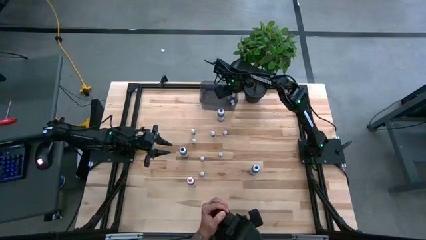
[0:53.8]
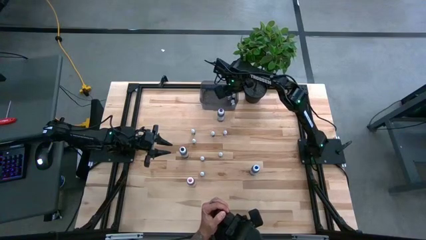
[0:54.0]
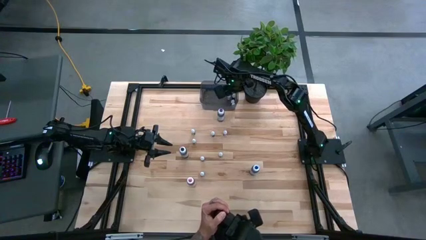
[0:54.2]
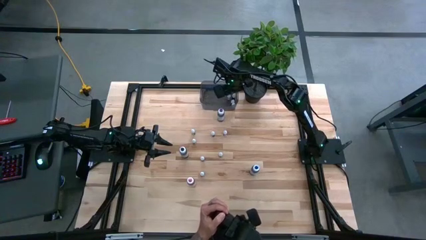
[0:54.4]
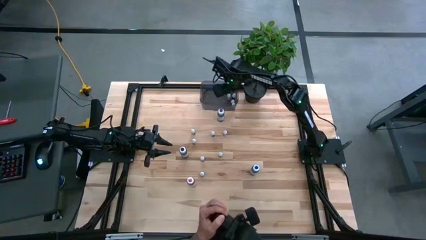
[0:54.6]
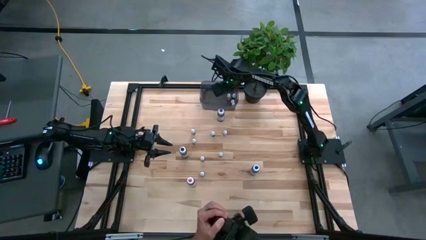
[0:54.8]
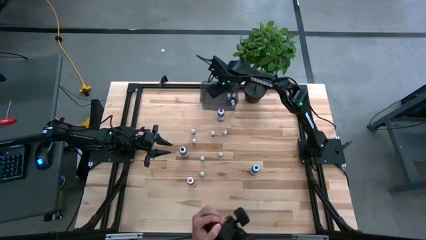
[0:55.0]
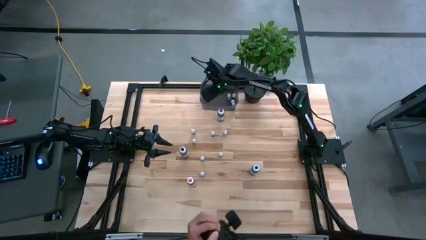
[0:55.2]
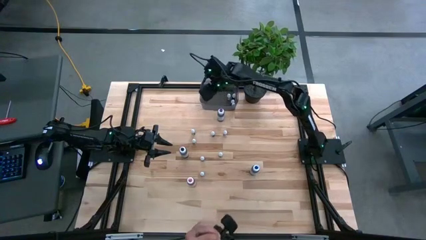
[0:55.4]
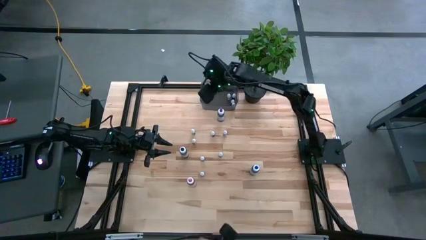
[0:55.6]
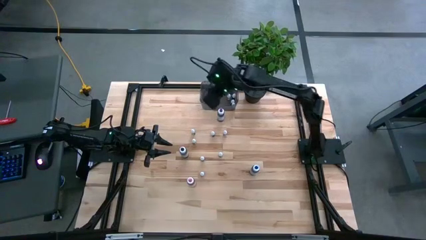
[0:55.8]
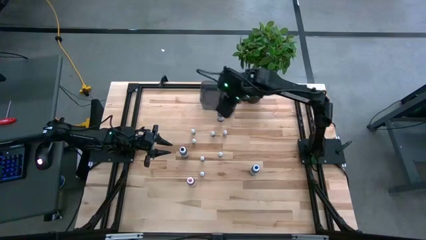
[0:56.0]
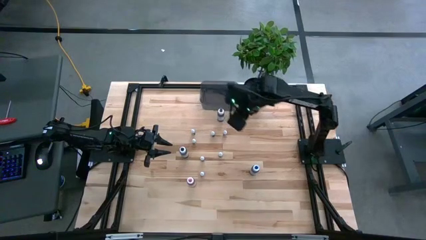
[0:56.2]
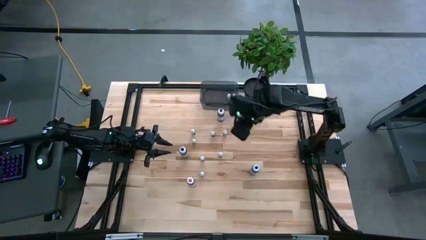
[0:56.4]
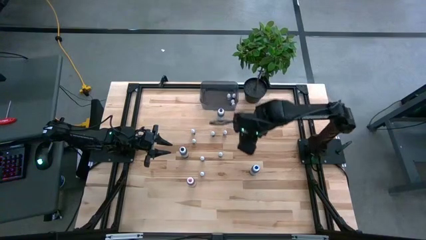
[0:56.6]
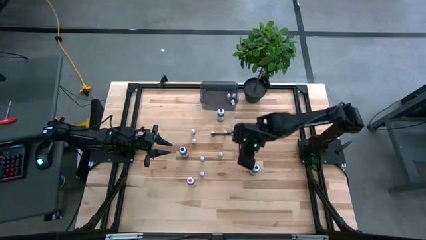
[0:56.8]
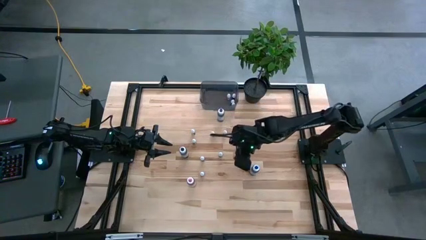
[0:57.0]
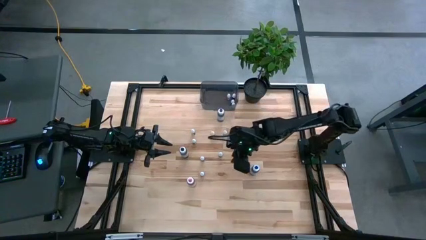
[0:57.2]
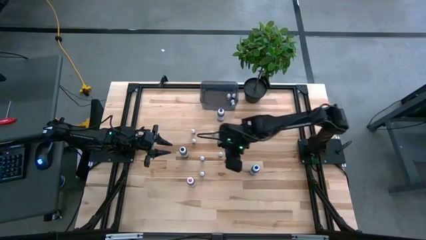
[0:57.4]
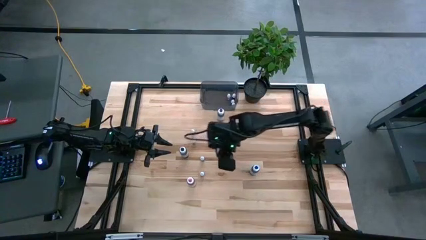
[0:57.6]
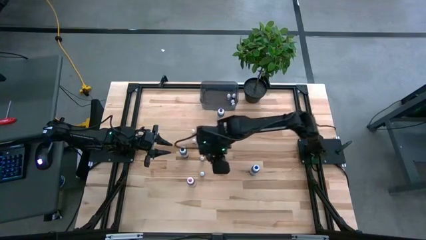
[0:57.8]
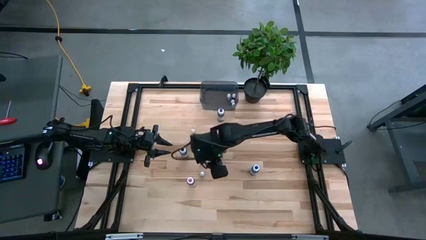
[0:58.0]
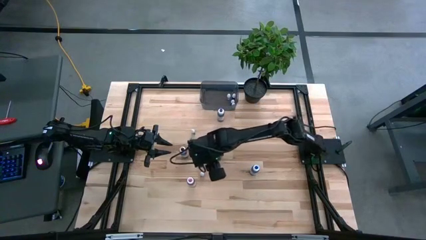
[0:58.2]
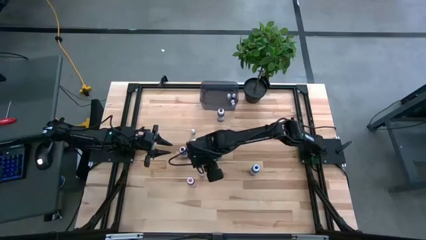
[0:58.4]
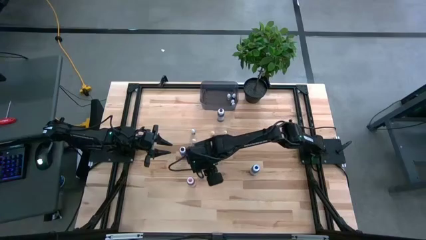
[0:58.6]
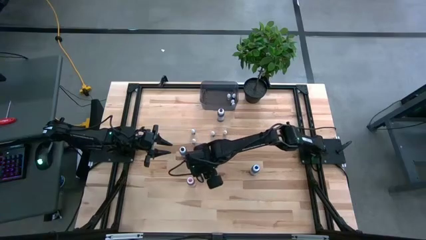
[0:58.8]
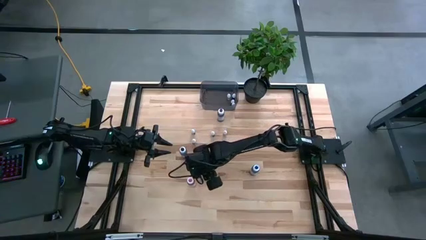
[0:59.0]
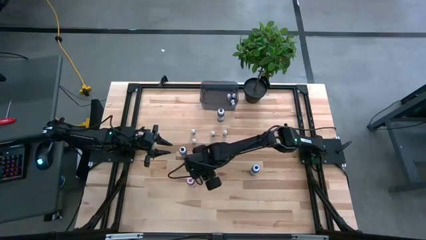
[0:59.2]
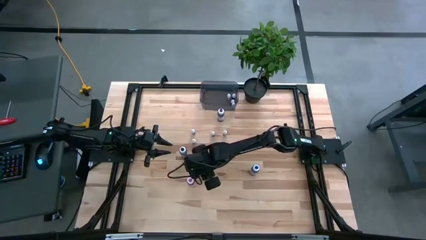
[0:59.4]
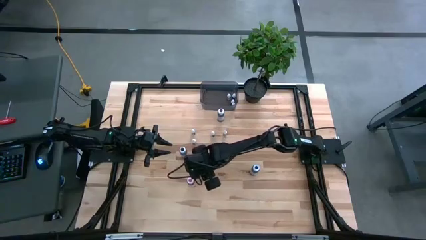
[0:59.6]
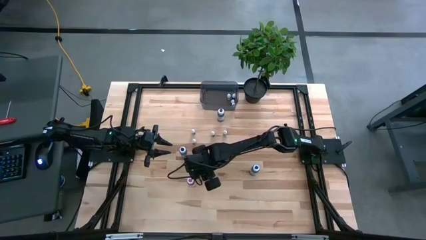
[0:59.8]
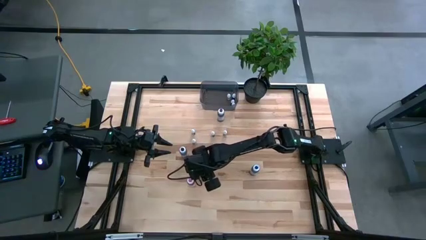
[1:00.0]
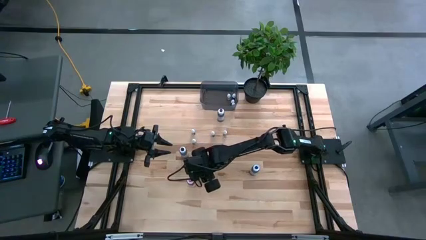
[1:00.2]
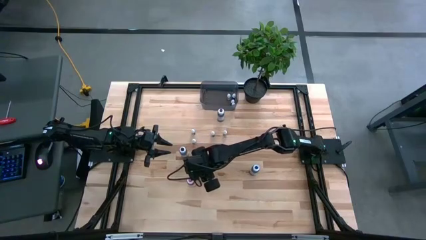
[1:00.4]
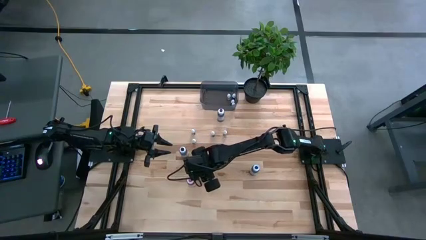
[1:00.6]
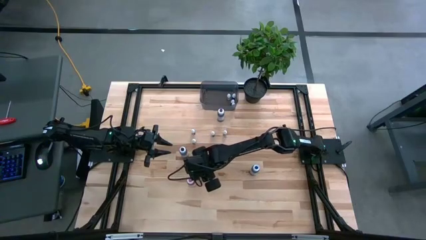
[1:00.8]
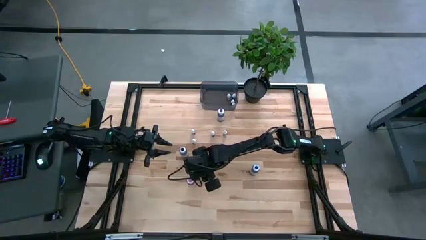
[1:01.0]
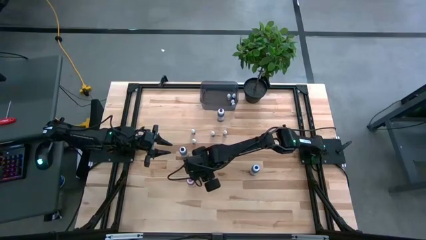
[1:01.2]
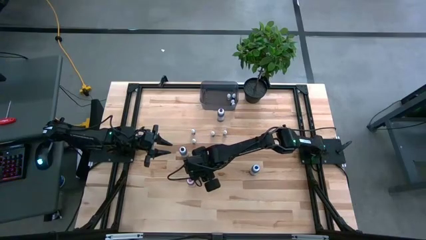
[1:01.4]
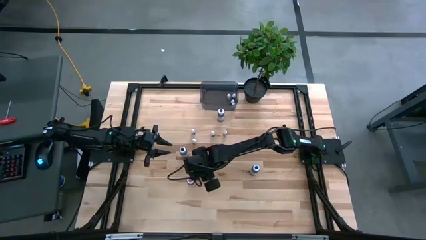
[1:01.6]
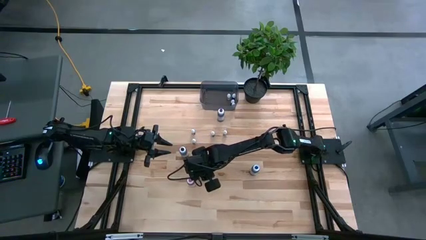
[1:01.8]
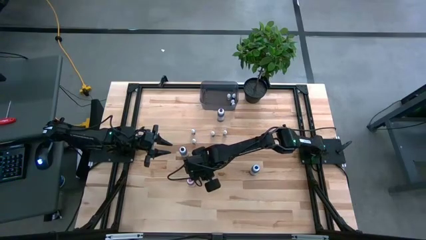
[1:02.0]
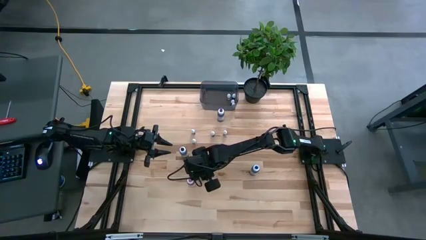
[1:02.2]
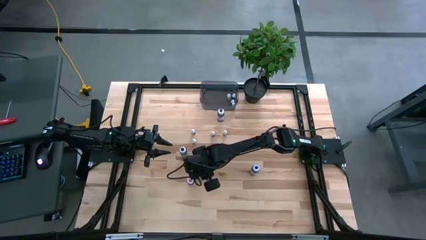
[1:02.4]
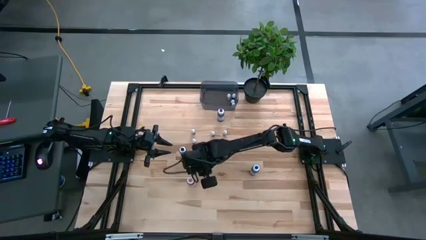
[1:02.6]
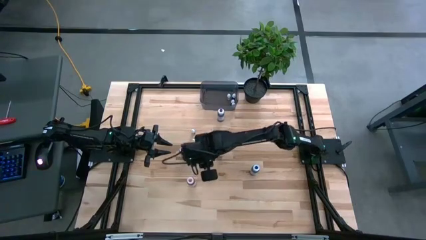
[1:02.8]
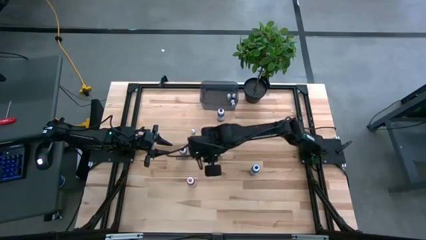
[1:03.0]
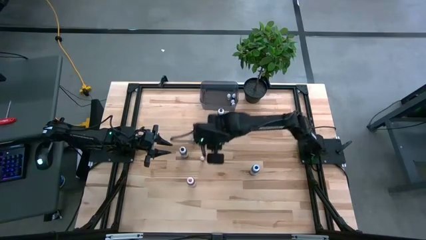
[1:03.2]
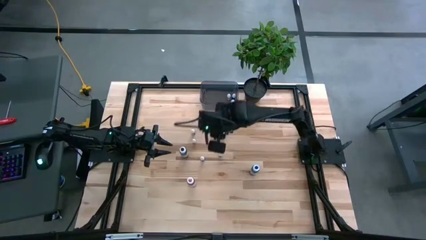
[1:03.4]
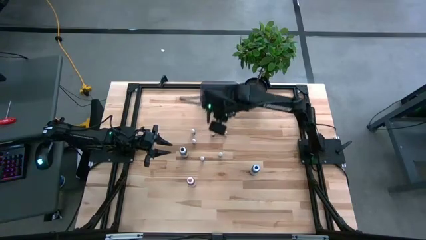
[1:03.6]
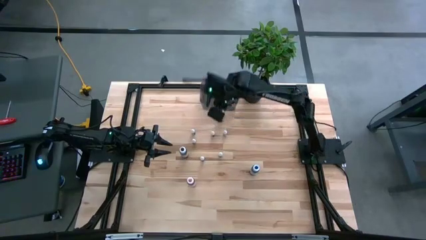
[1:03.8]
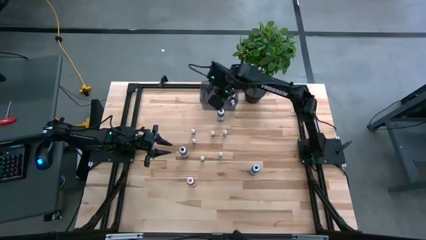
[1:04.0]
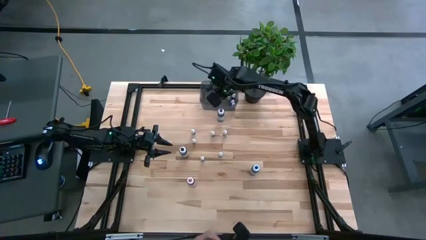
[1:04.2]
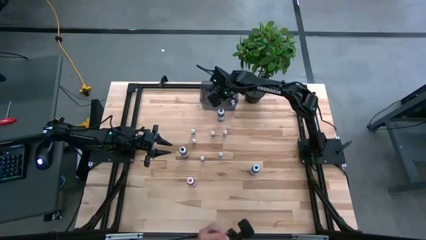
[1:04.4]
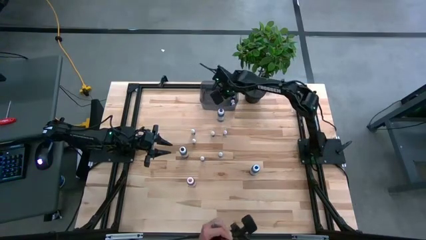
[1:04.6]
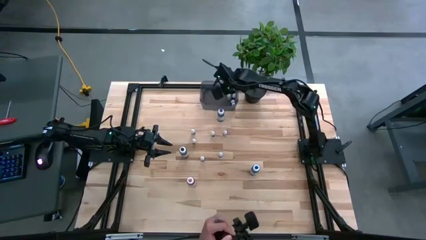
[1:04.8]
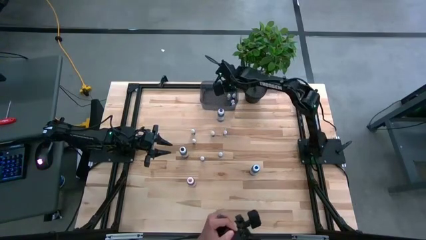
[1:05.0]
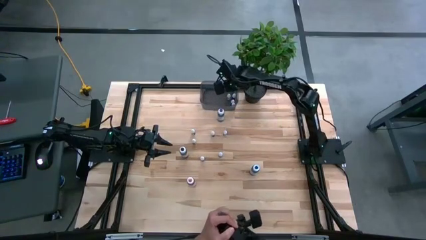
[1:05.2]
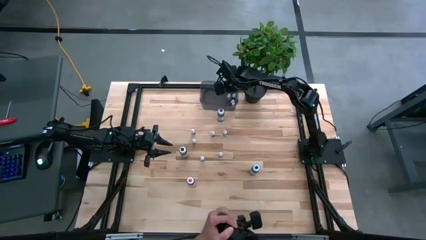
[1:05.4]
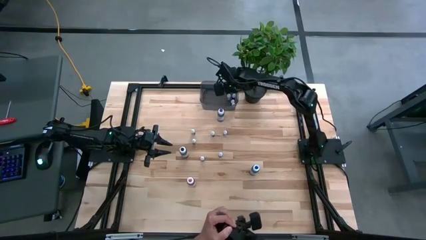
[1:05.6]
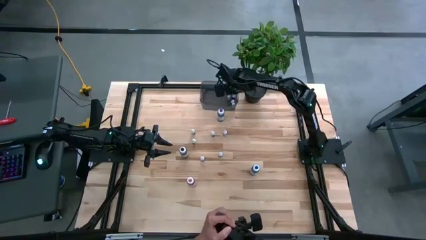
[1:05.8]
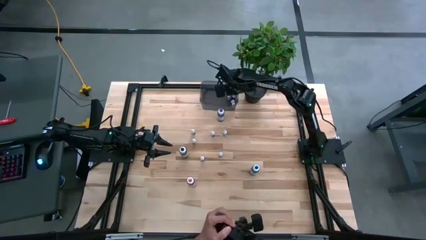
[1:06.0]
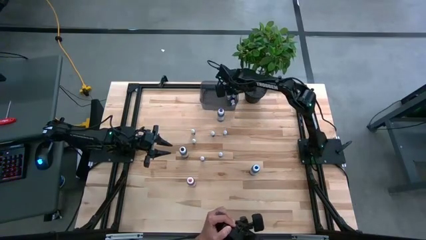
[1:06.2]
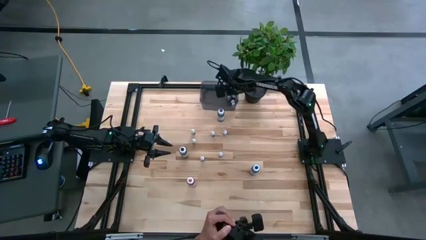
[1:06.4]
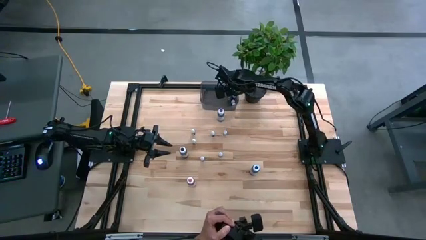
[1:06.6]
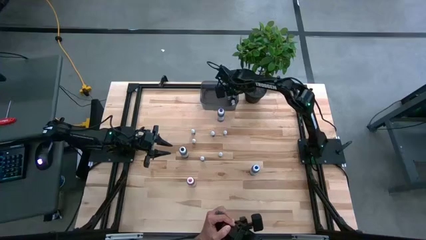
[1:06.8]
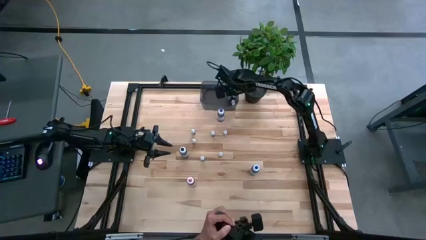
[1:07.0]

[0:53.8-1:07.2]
Task: Pick & Place food coloring
Put the small dark green colored food into the black bin
